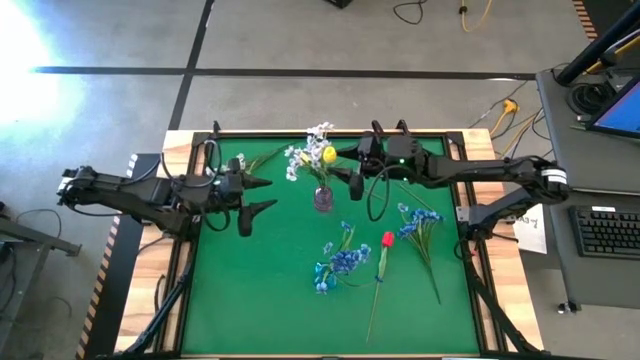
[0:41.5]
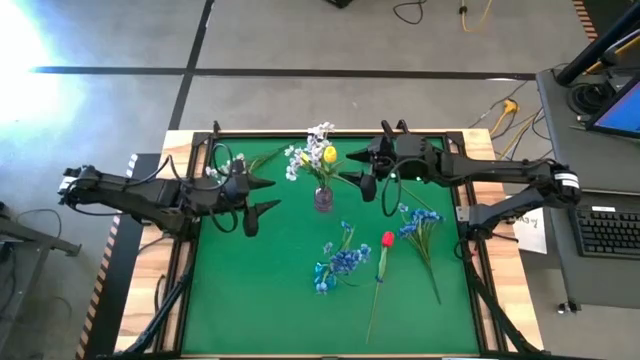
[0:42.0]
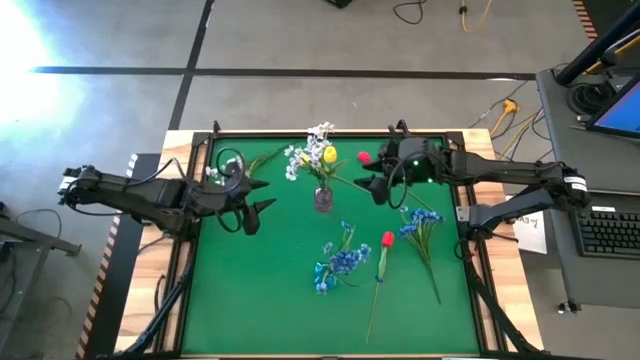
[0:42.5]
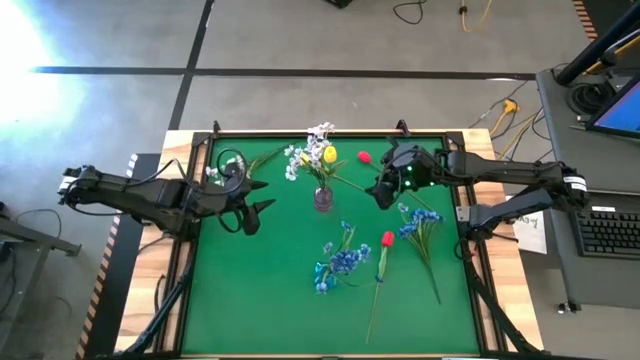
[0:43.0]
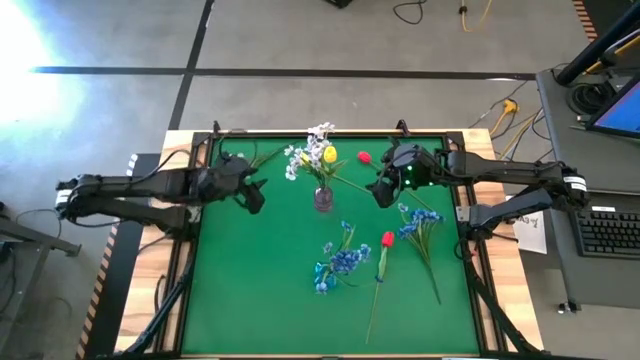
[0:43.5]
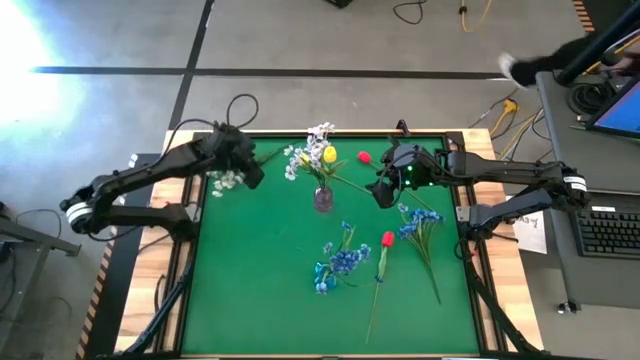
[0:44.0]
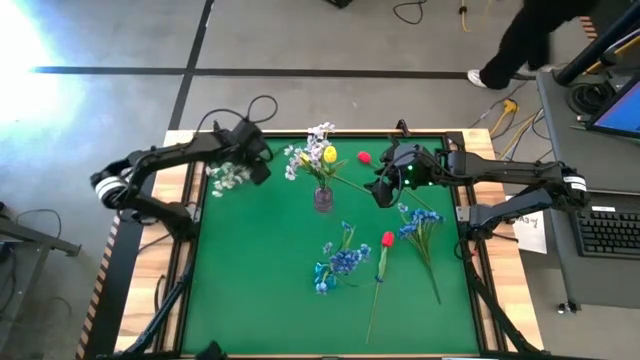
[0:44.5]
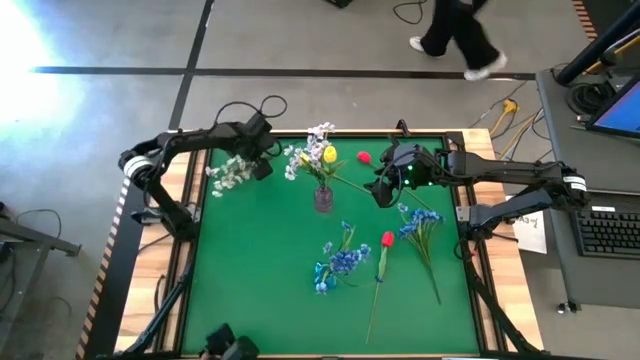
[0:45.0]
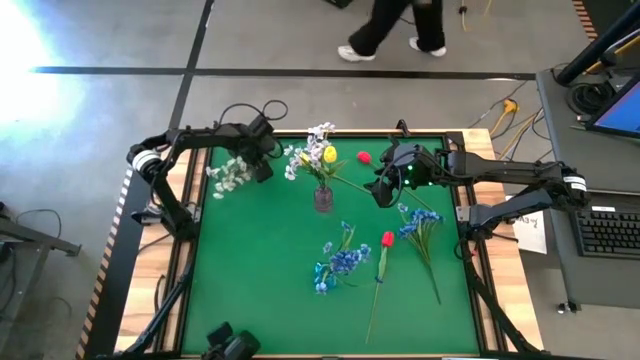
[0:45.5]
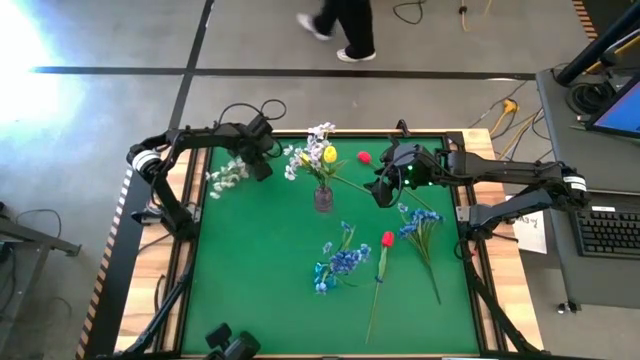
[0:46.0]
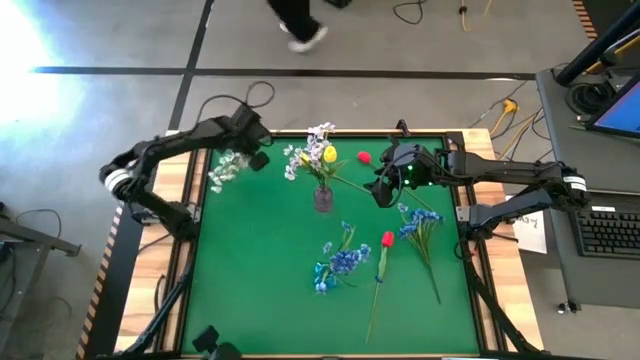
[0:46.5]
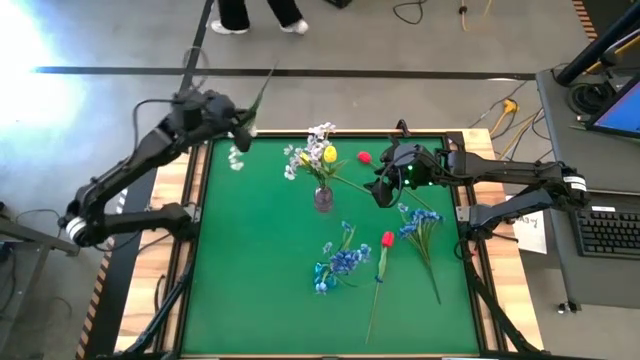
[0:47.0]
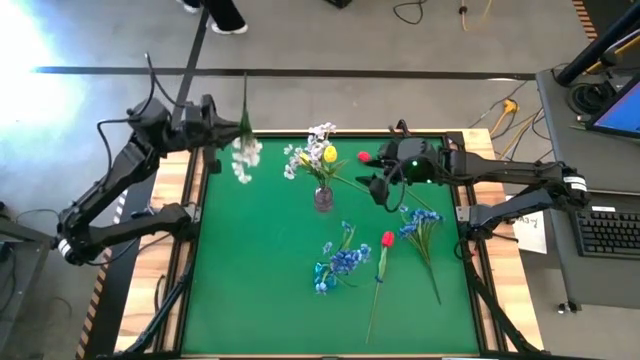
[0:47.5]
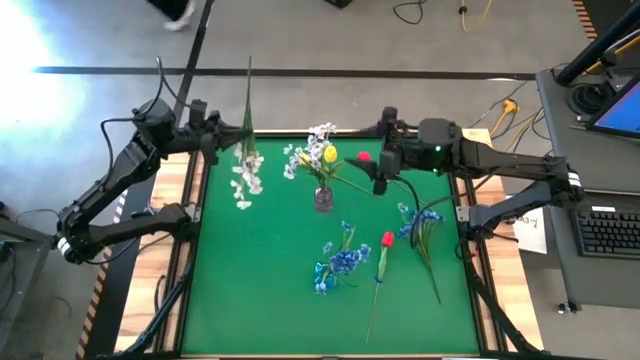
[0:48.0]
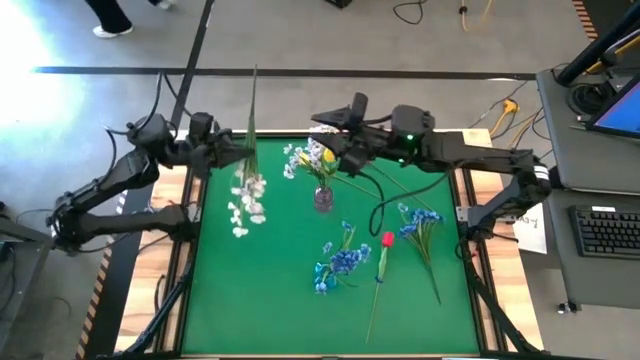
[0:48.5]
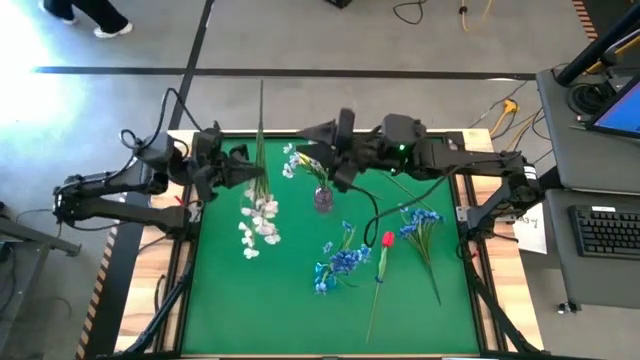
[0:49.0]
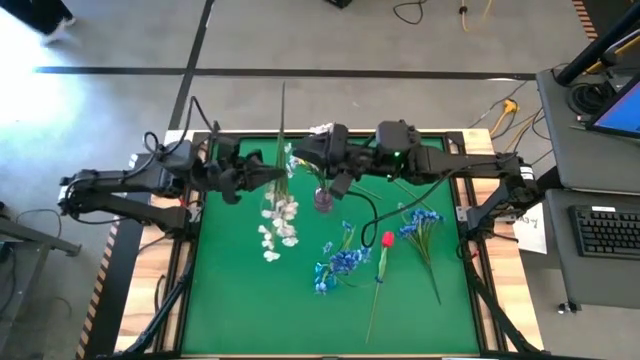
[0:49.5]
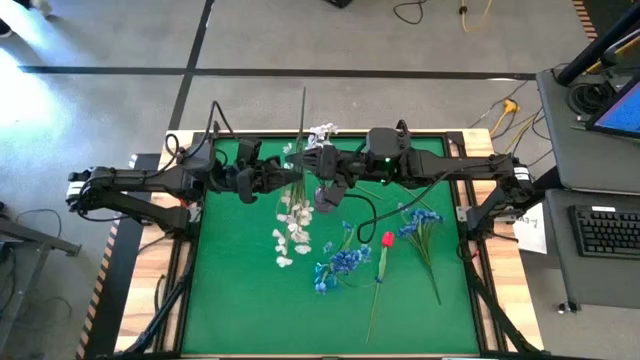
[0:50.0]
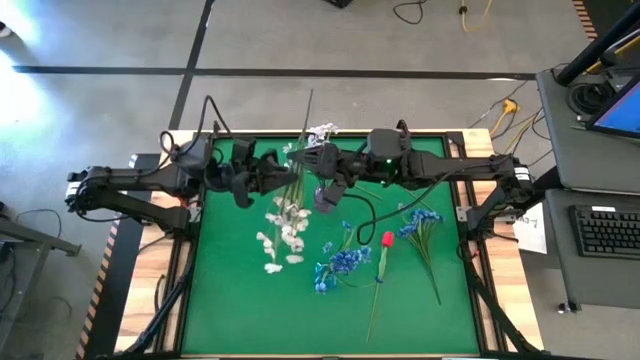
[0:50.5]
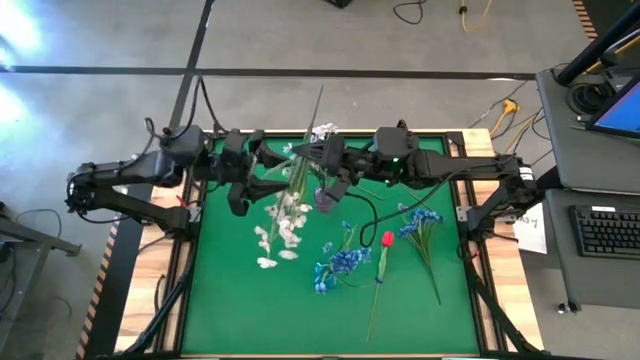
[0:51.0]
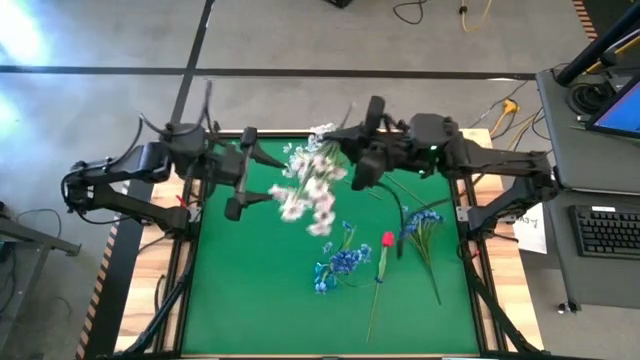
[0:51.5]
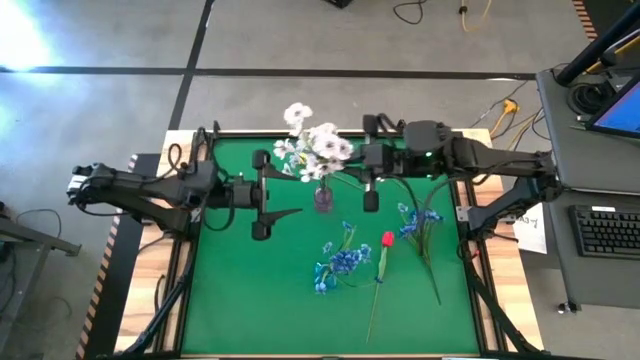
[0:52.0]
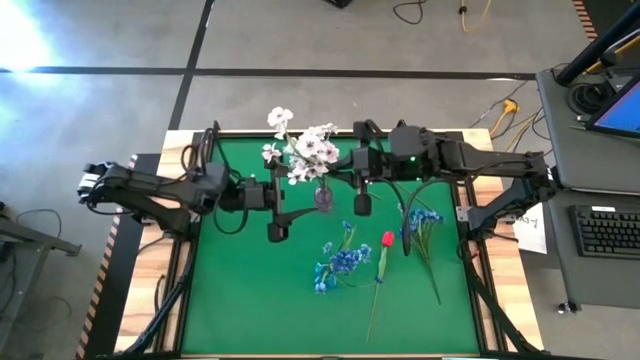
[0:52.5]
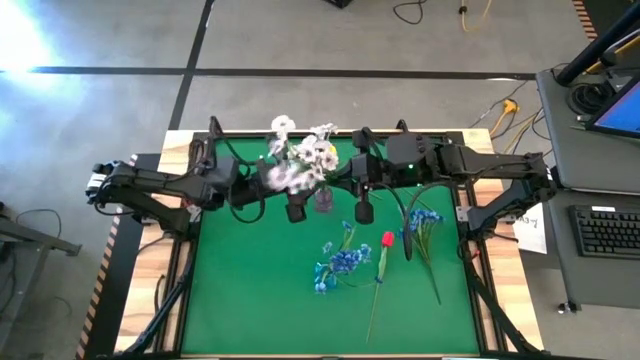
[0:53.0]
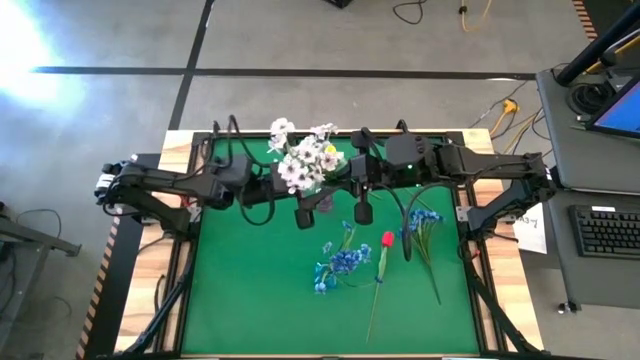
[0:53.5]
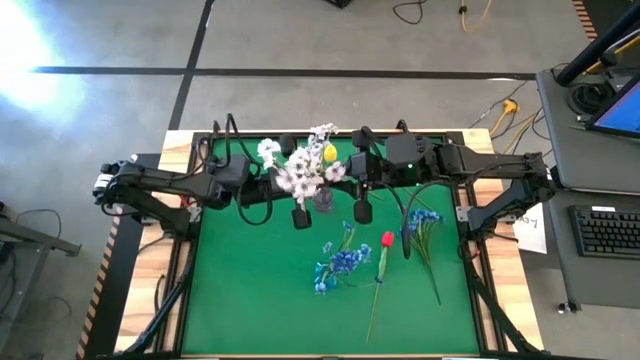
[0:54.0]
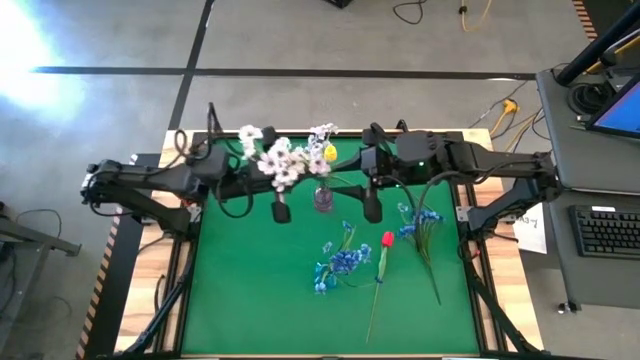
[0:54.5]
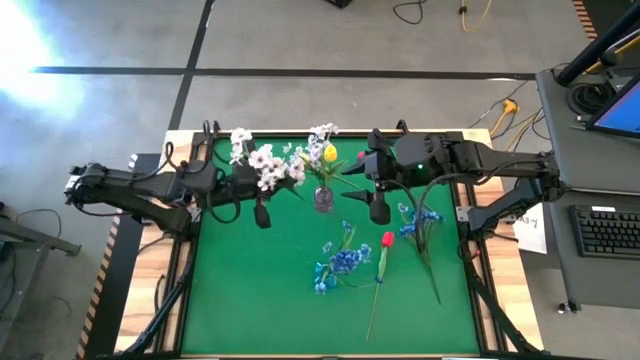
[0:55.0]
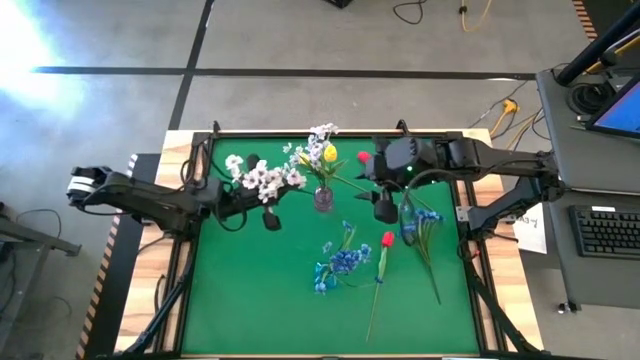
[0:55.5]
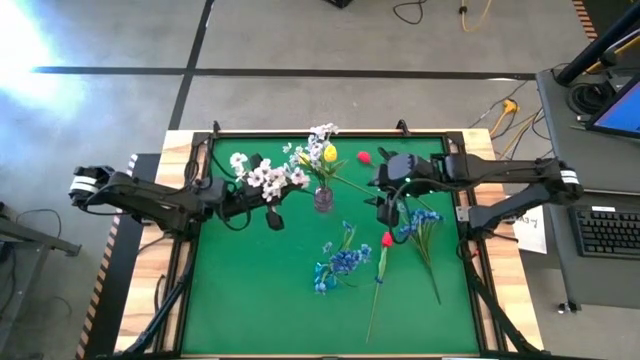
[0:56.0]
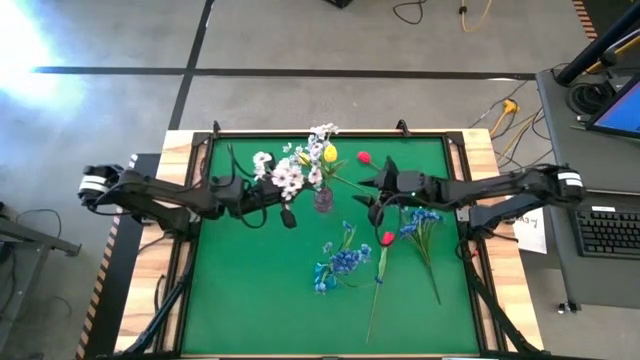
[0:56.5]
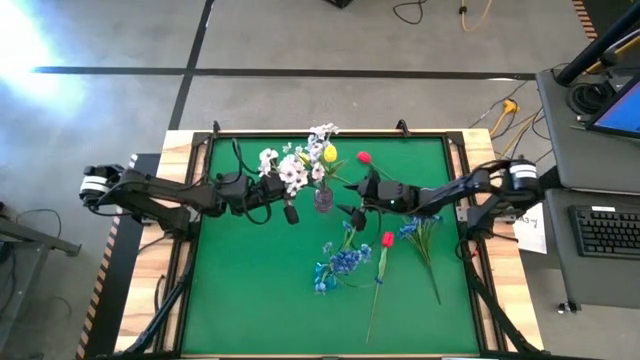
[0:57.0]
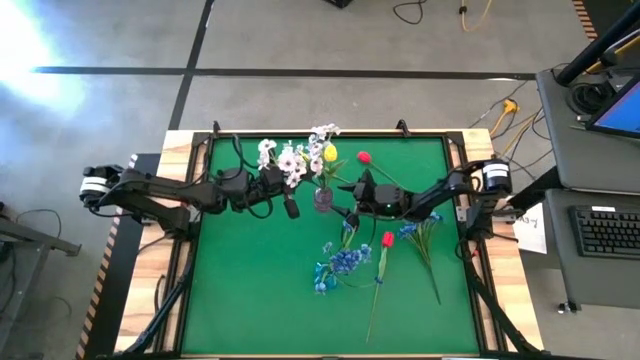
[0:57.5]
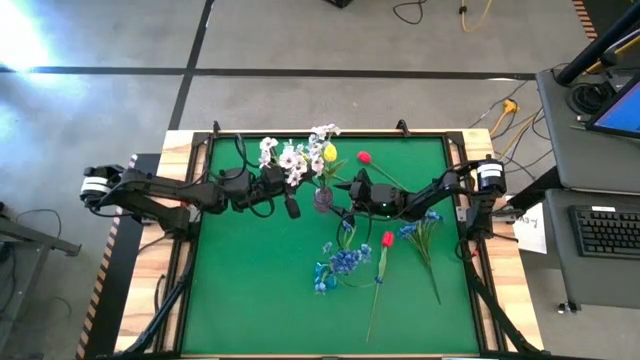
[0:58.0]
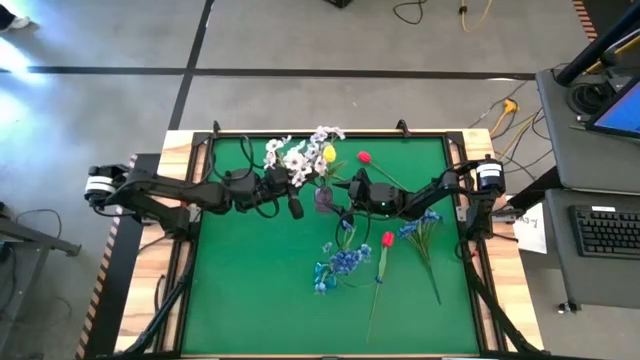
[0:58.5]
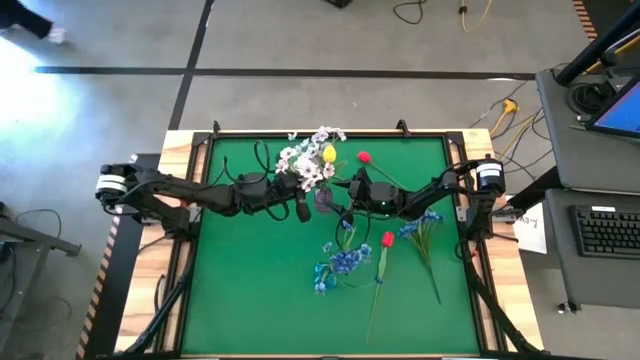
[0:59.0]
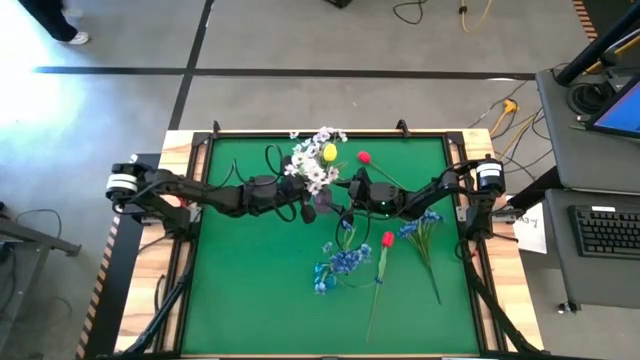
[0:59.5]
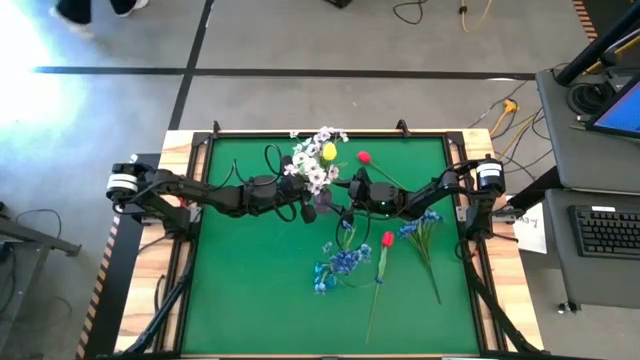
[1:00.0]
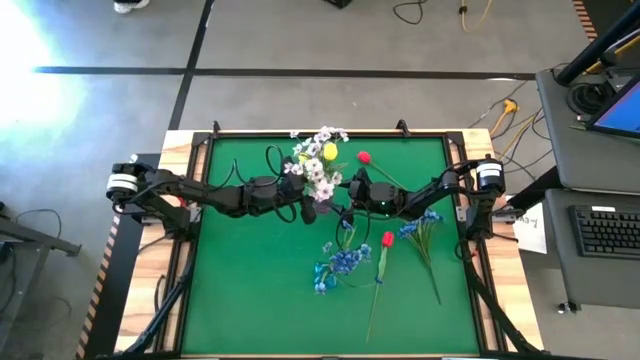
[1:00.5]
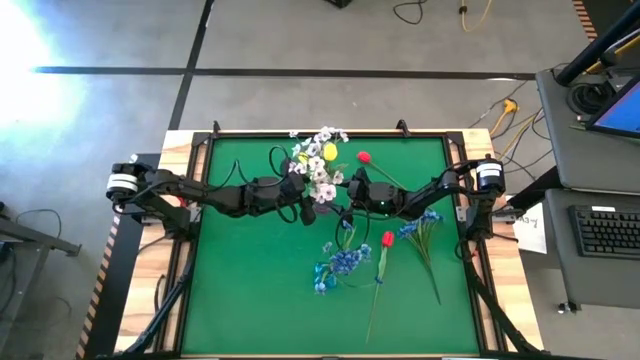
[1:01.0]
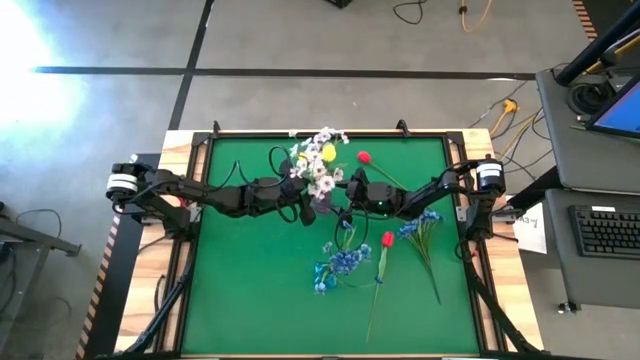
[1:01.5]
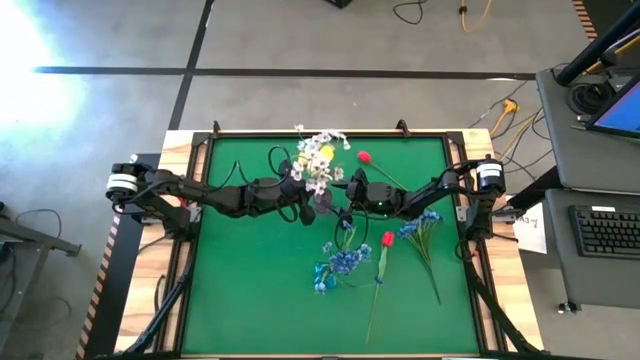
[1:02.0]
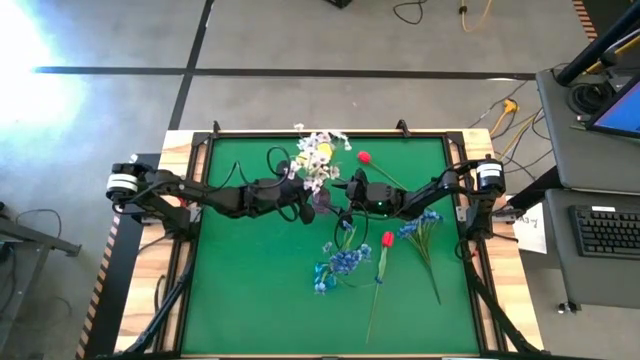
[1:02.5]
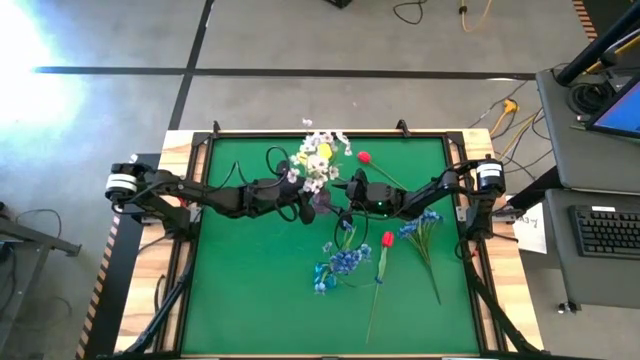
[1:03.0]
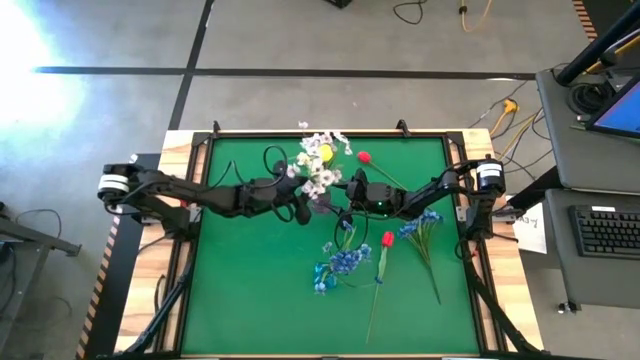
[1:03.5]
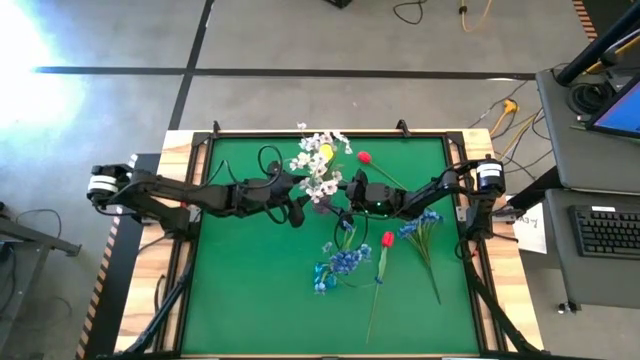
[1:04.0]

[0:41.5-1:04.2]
Task: Sort flowers into vase by color
Put the white flowers into the violet vase
